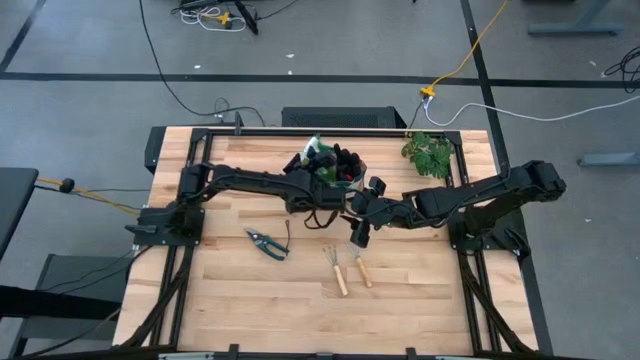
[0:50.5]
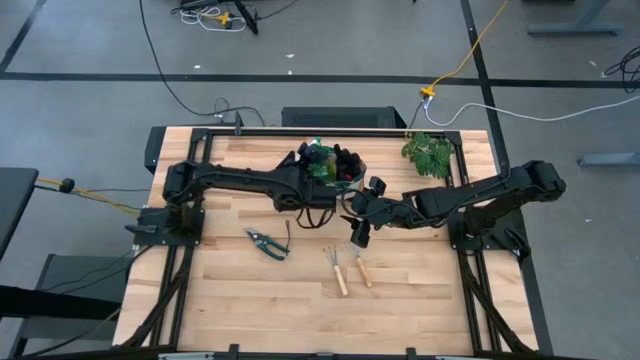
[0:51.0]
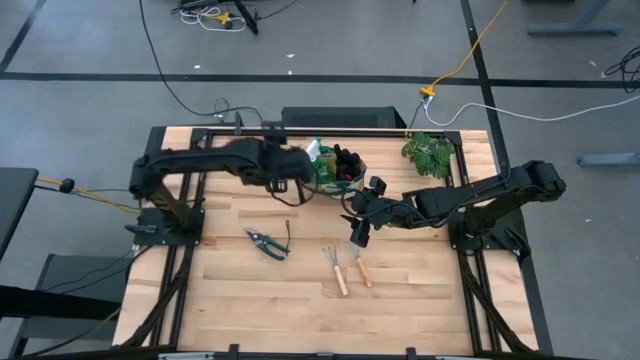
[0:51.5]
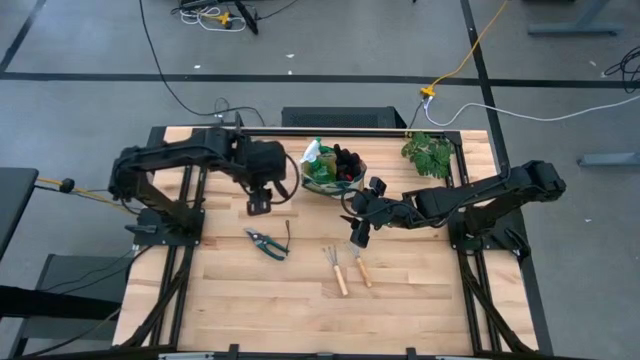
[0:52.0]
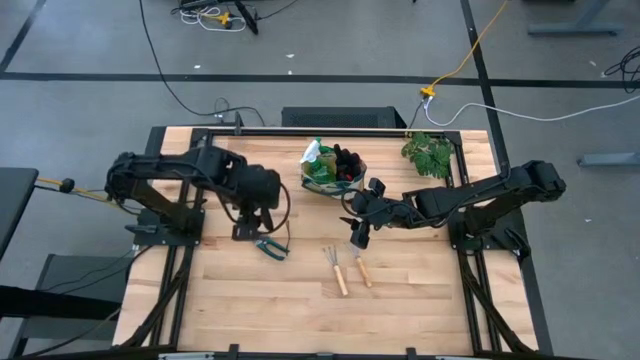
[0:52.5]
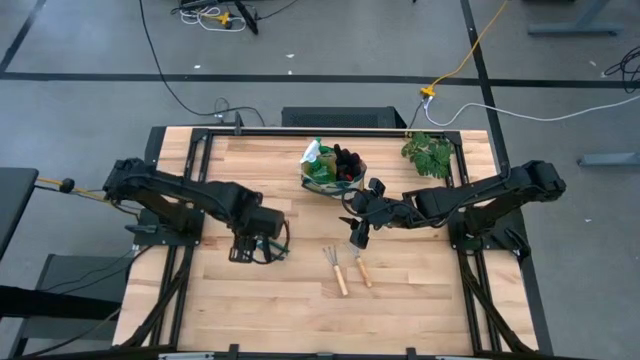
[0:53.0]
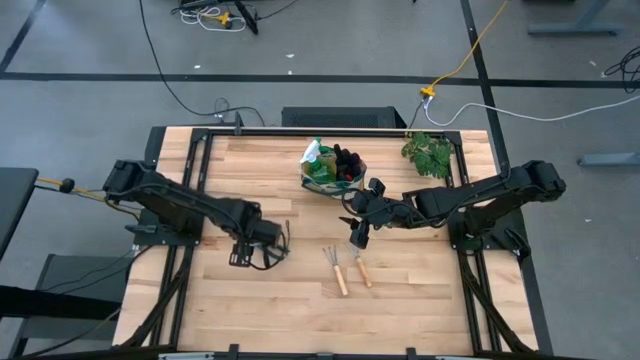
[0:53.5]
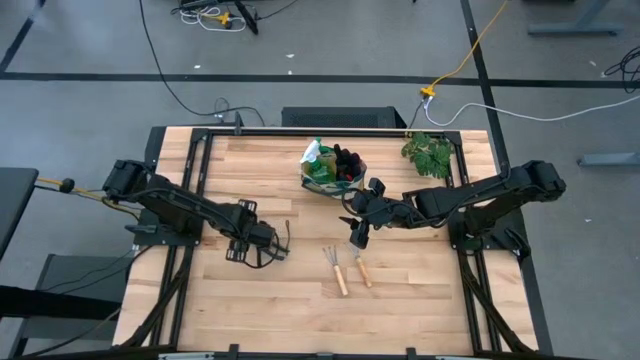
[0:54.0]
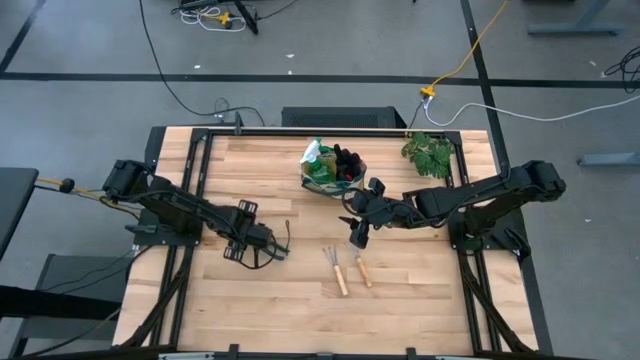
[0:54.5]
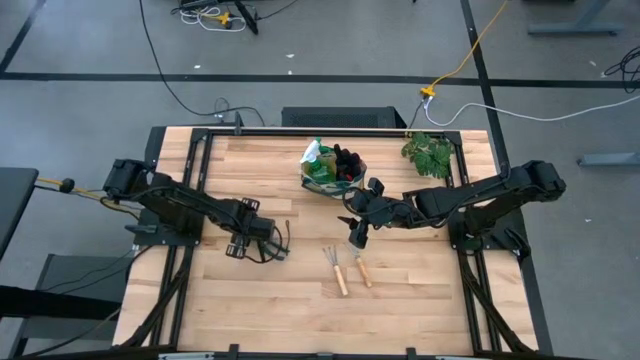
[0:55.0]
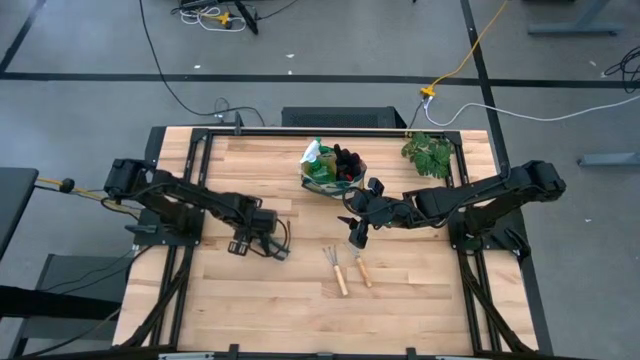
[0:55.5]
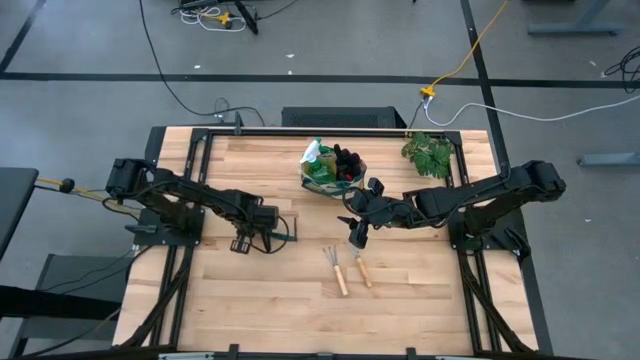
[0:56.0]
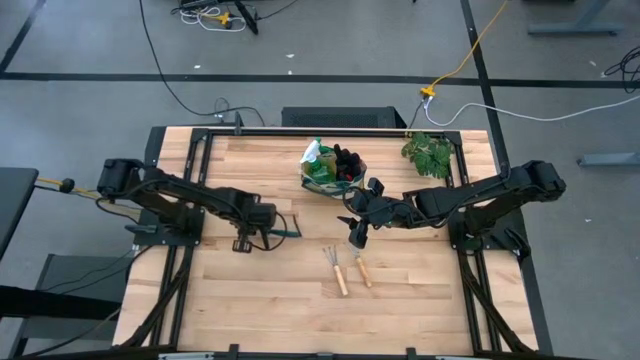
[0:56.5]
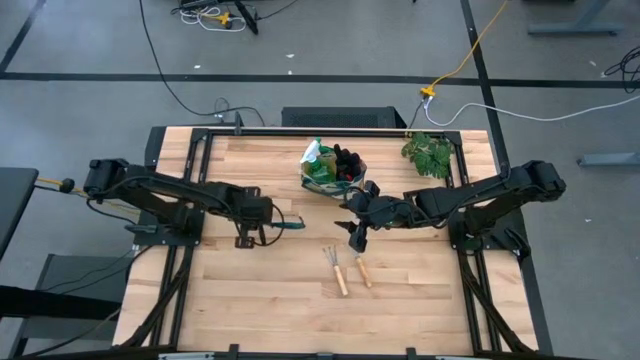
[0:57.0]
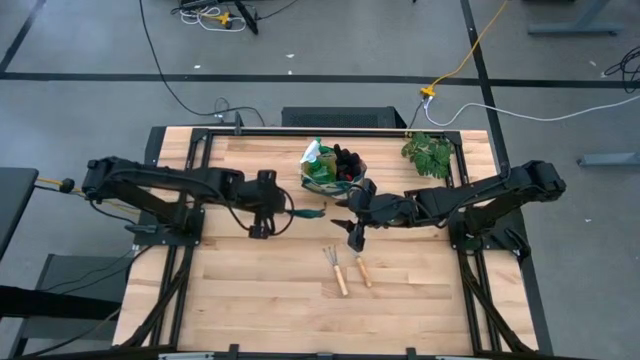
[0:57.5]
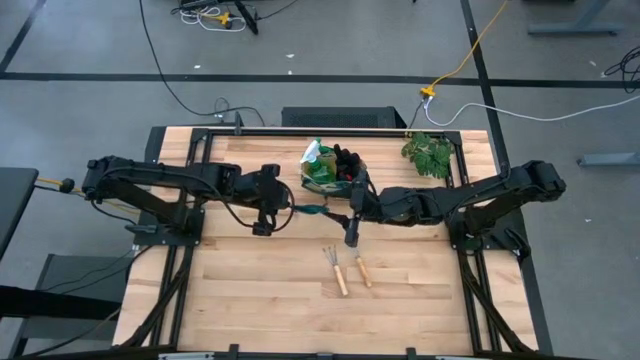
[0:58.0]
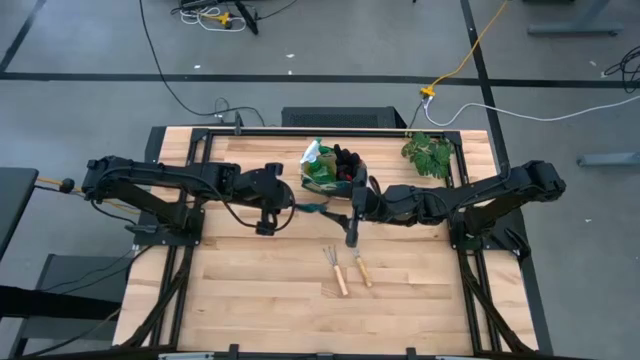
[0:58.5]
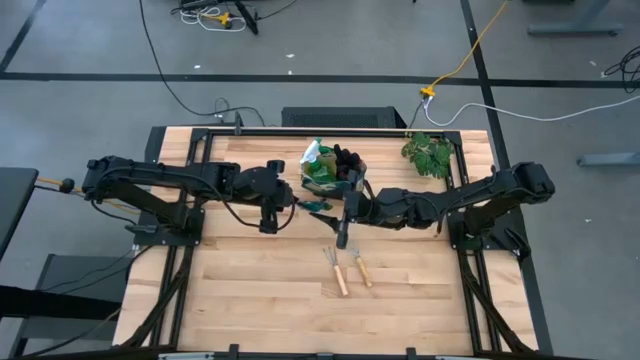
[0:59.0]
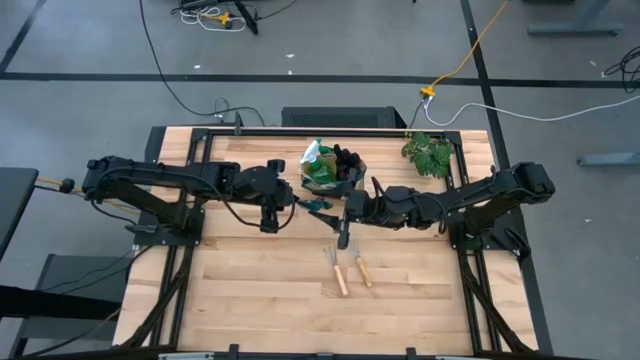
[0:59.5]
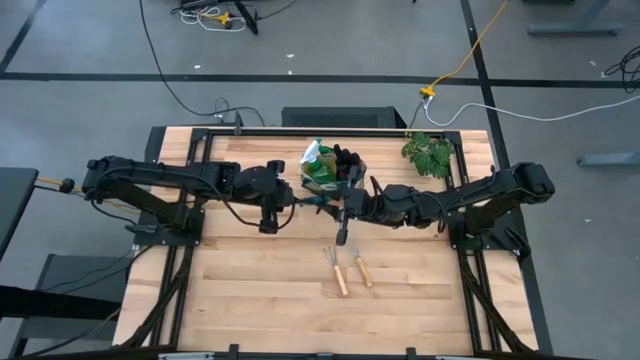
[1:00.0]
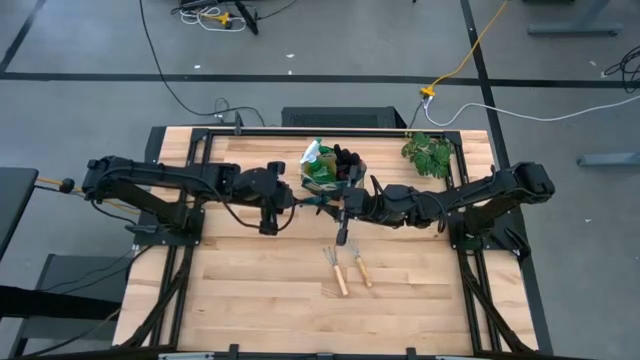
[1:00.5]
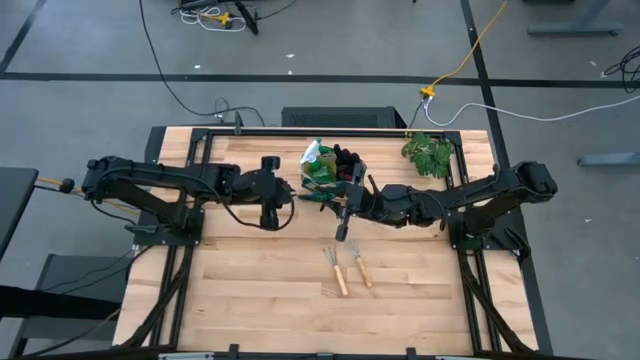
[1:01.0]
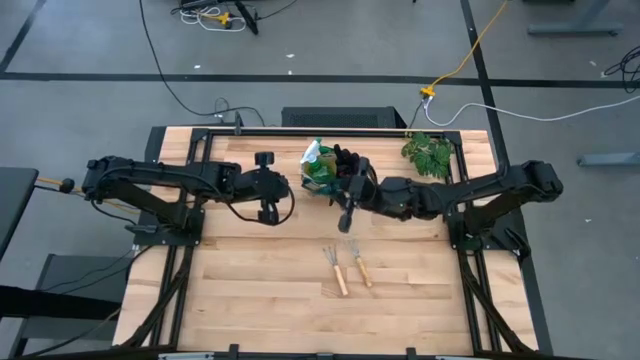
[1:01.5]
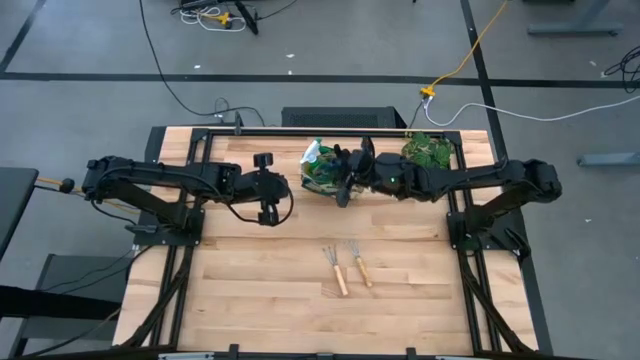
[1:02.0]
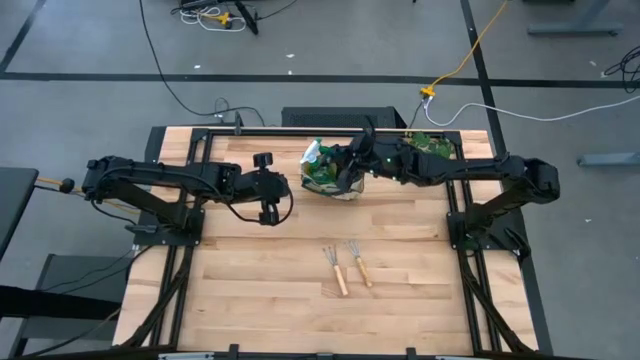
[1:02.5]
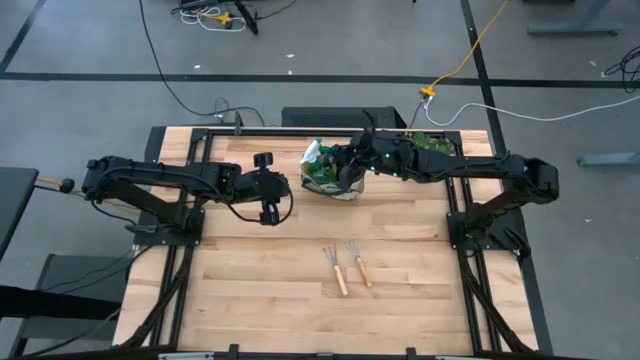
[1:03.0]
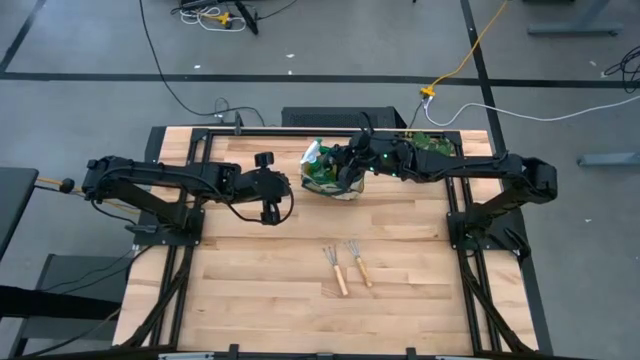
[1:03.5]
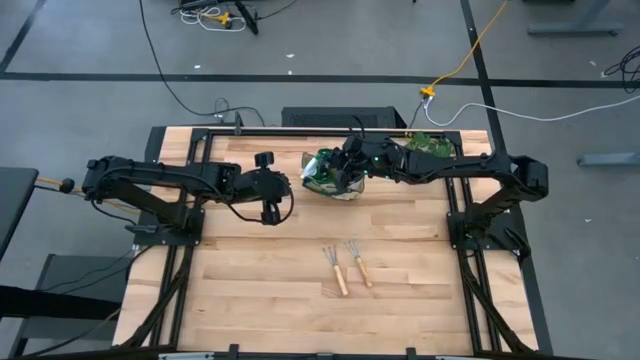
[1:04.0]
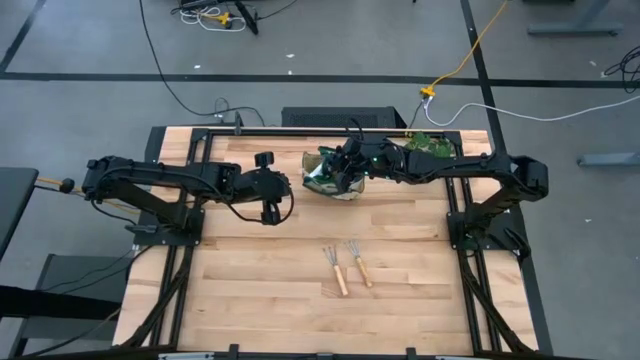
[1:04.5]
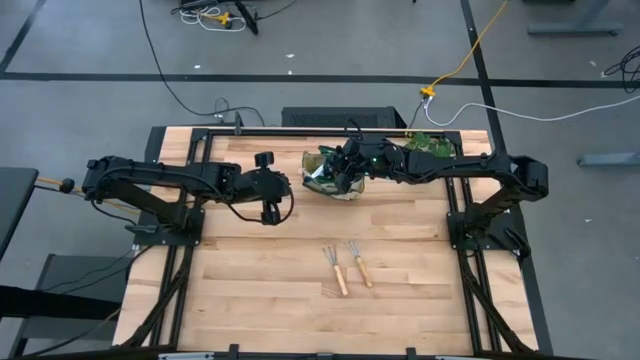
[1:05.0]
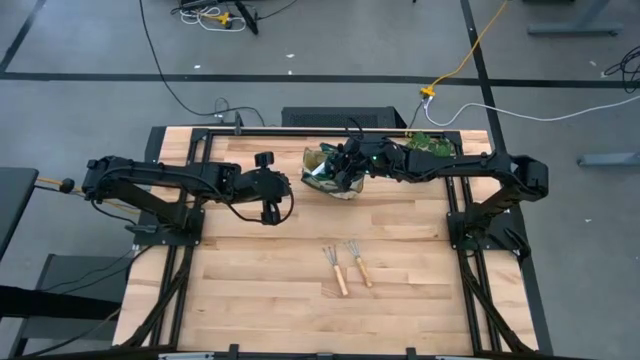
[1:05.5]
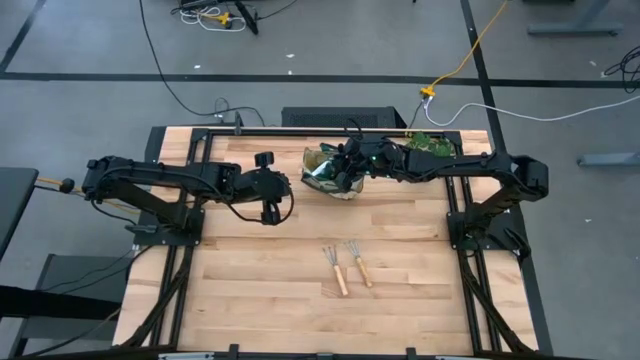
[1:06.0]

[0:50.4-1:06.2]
Task: Pick & Place Garden tools in Gardening bag
Put the pruning shears into the tool bag

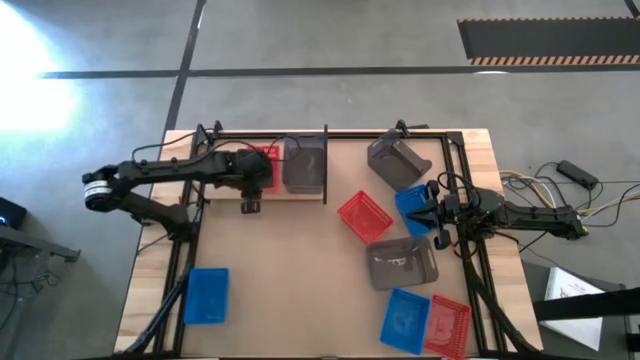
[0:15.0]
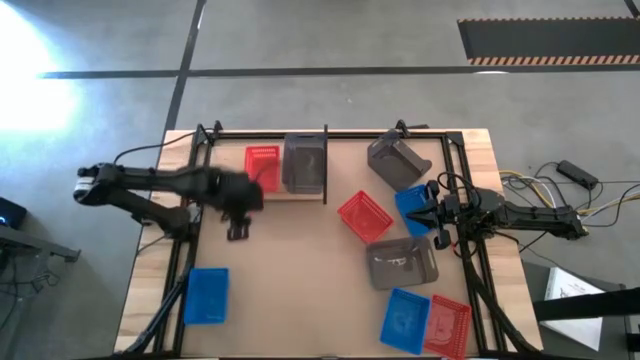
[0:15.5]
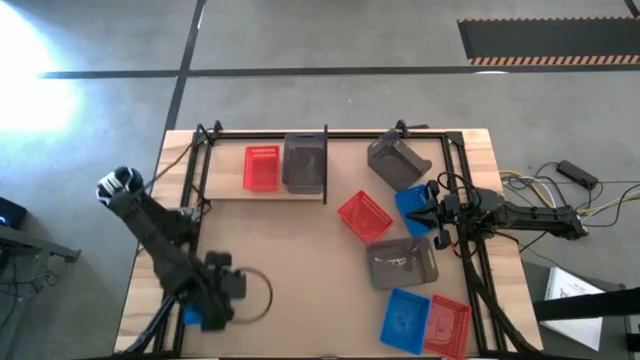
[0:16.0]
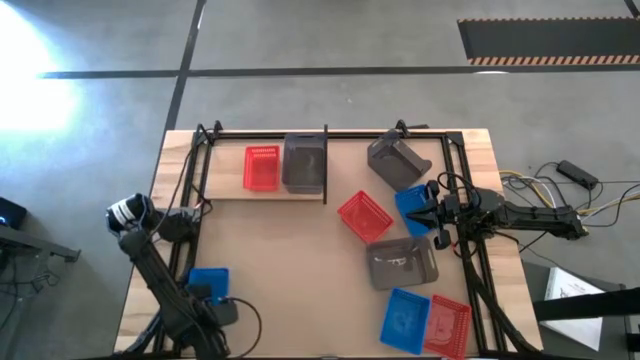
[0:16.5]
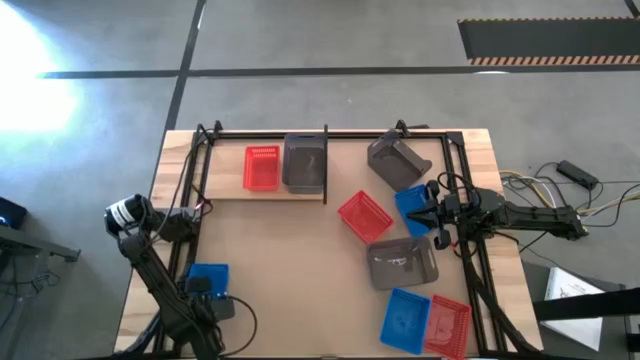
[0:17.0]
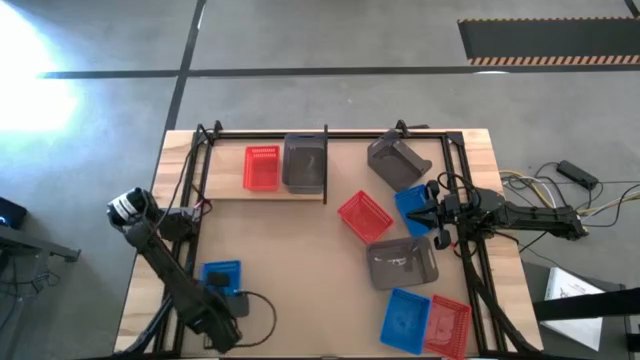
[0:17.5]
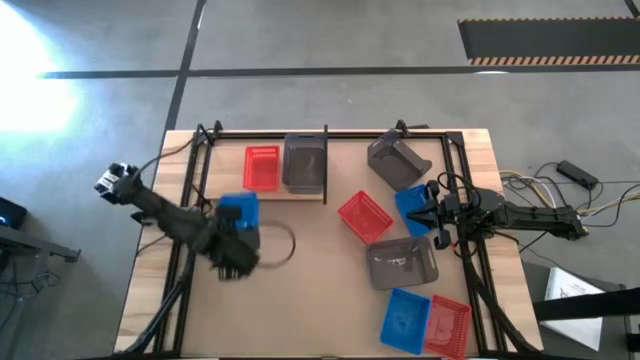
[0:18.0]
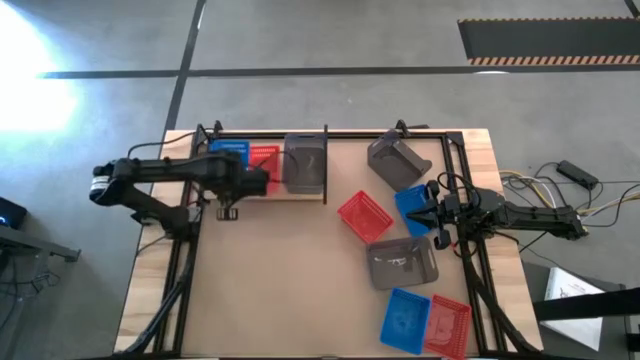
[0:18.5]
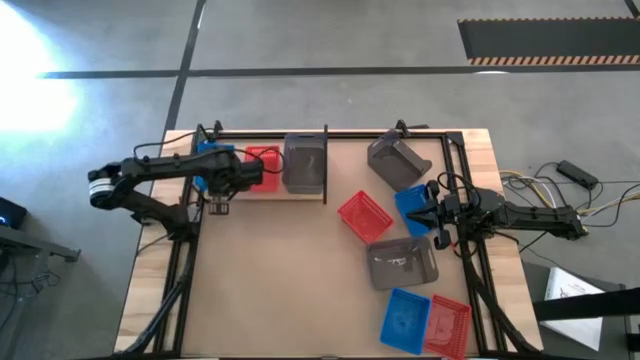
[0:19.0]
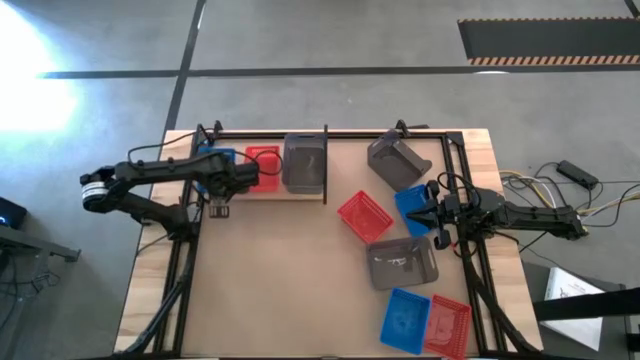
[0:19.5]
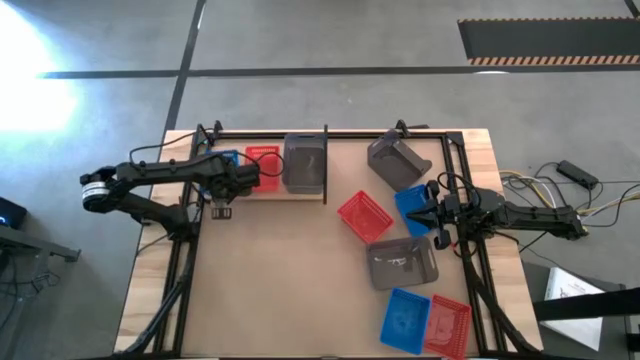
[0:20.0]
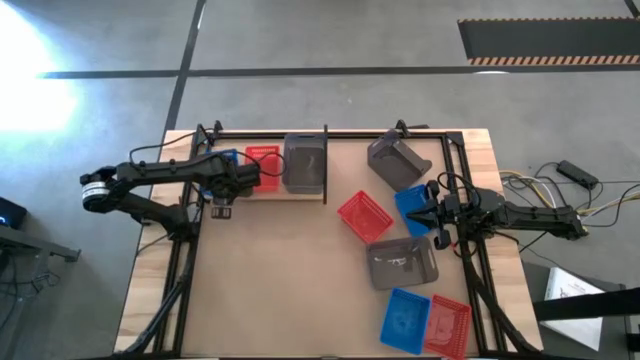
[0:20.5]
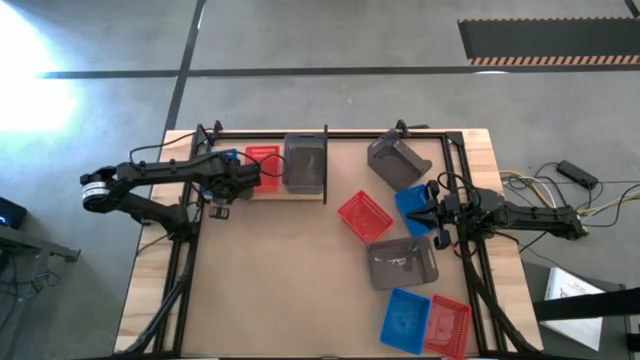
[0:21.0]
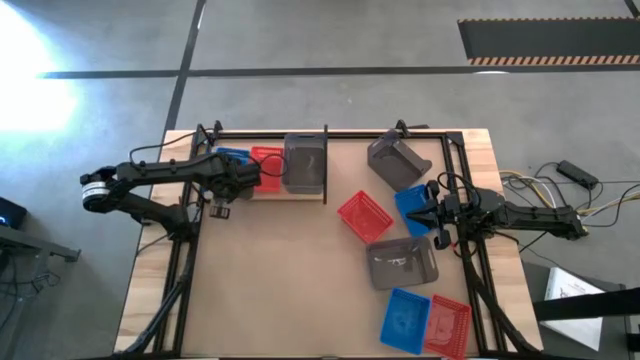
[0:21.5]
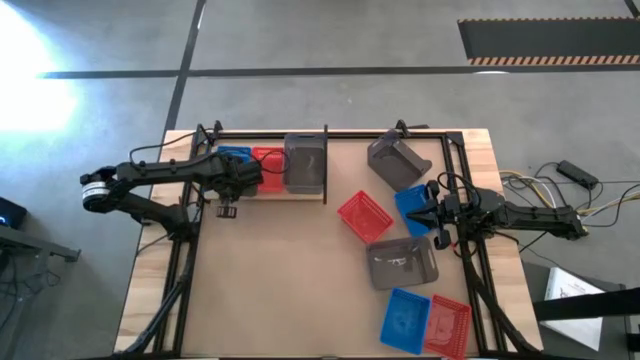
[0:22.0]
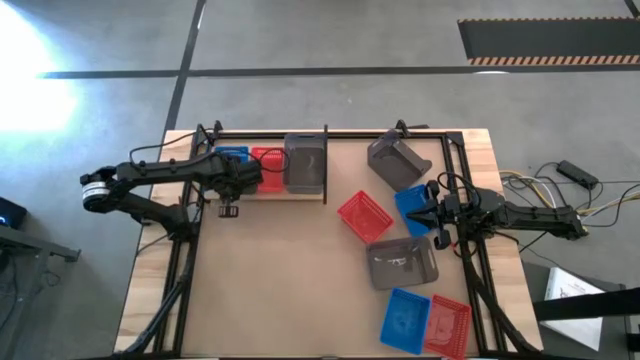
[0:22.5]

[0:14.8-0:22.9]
Task: Stack baskets on shelf by color
Put the bottom left blue bin on the shelf
